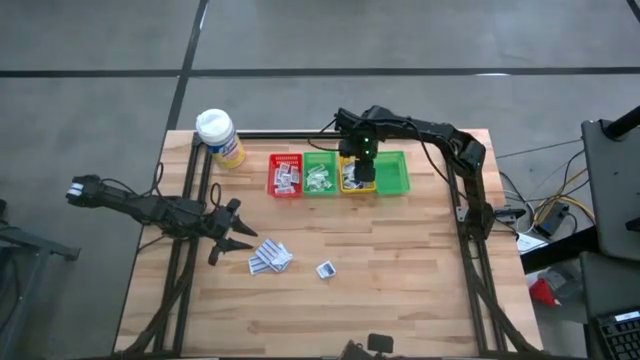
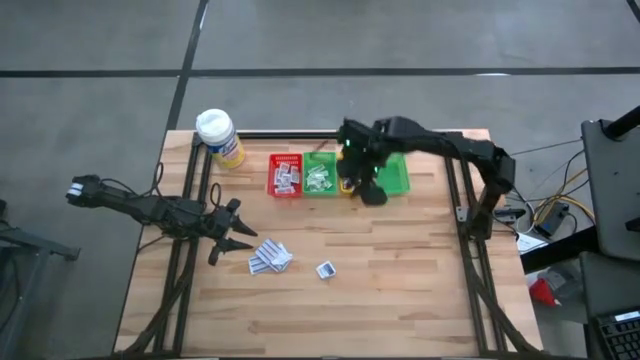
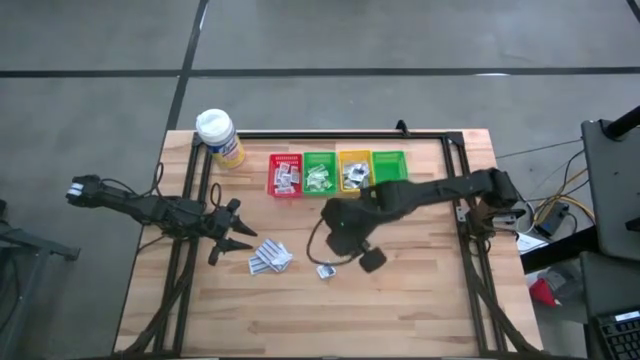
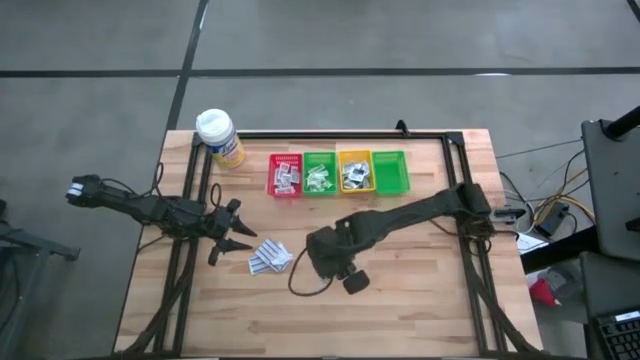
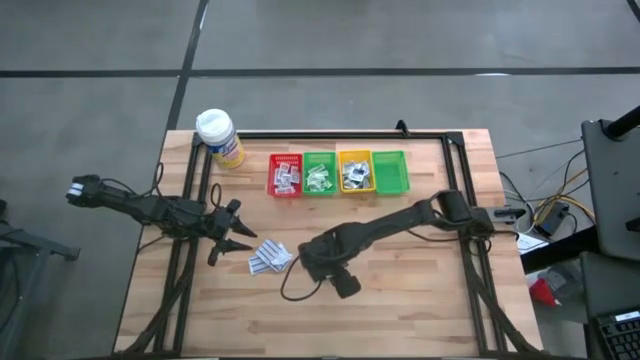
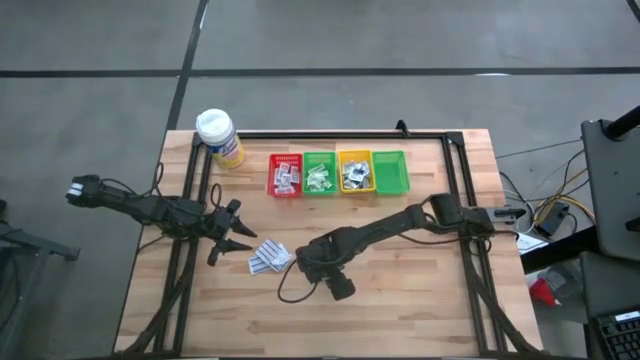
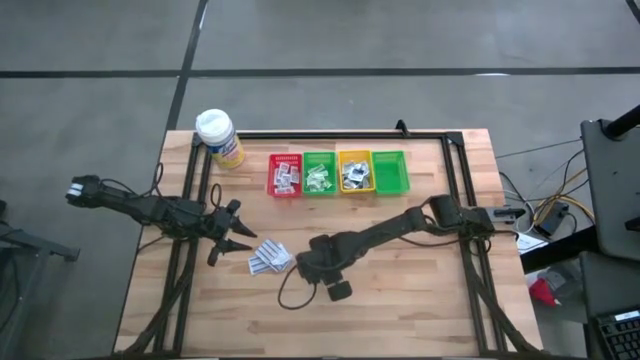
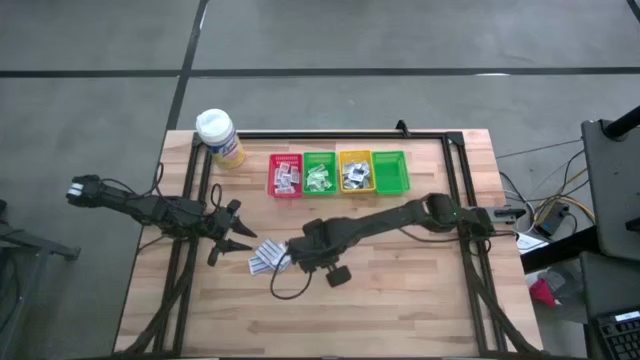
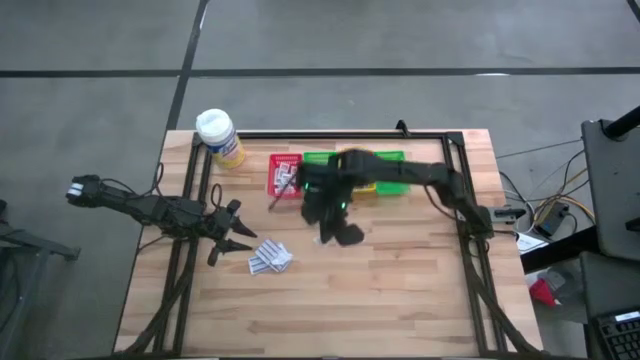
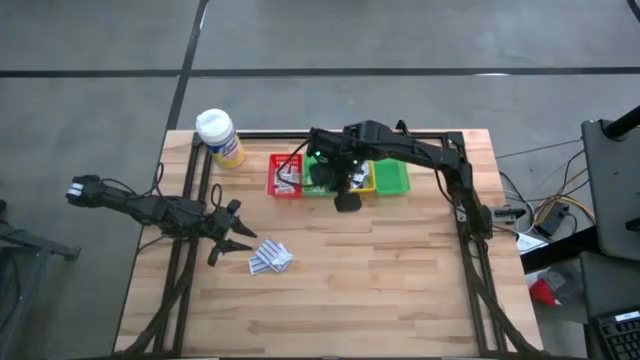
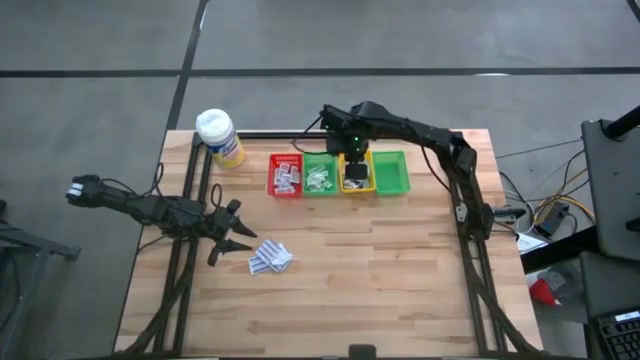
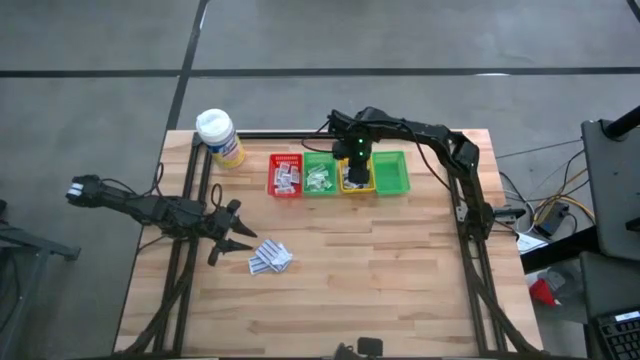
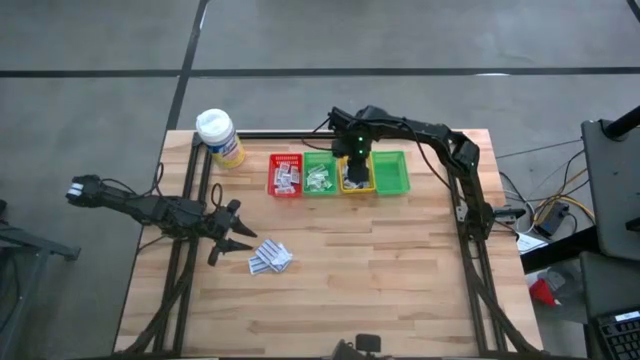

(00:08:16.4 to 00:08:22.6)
Task: Pick & Place First Aid Supplies
Put the alcohol pad into the yellow bin

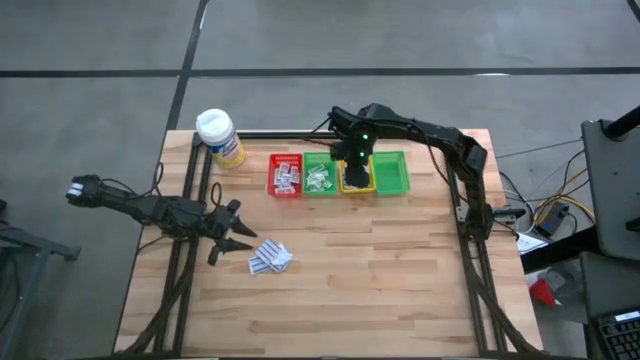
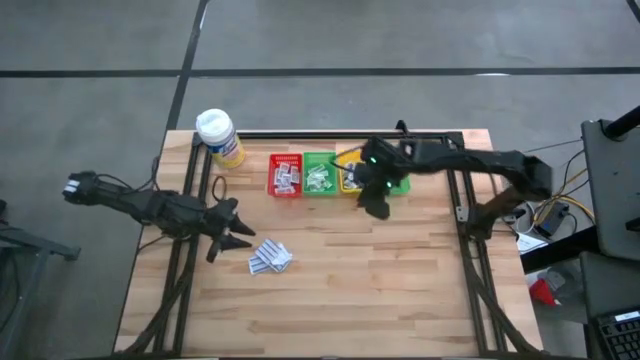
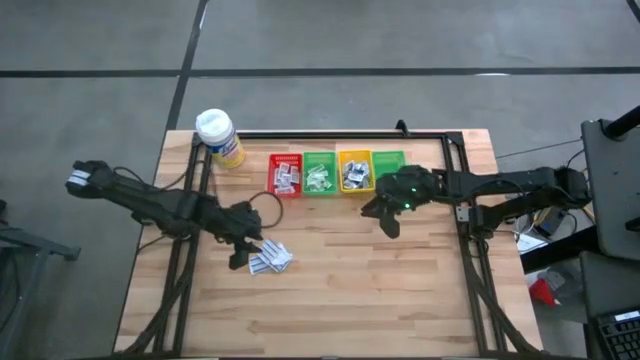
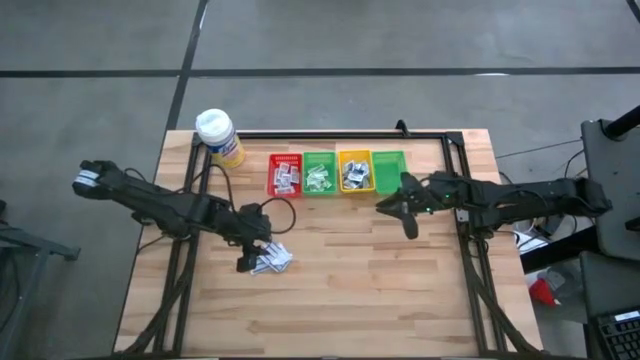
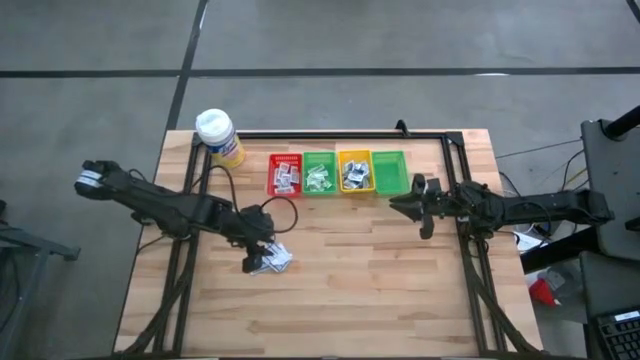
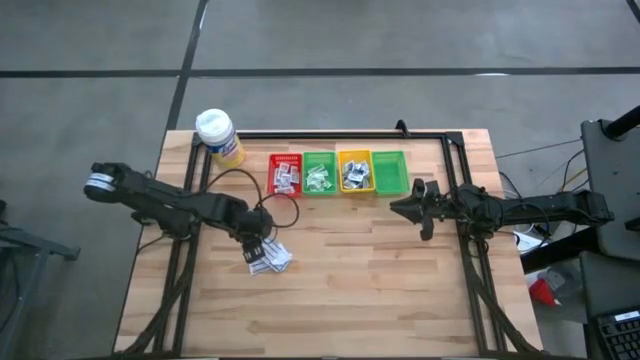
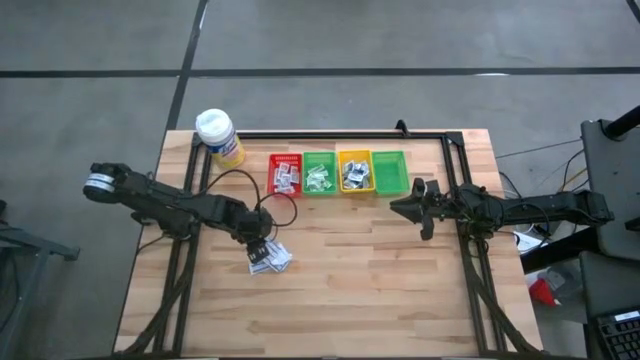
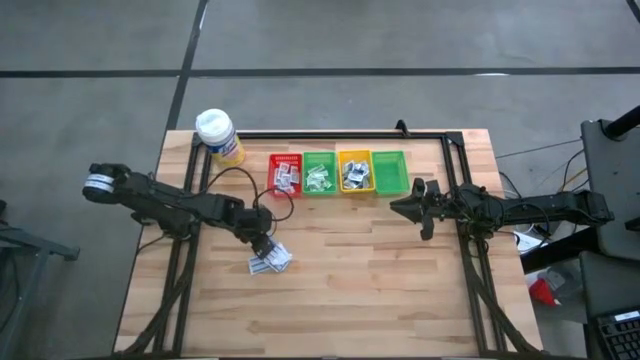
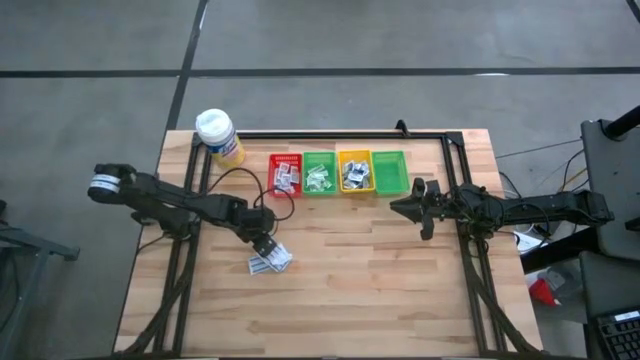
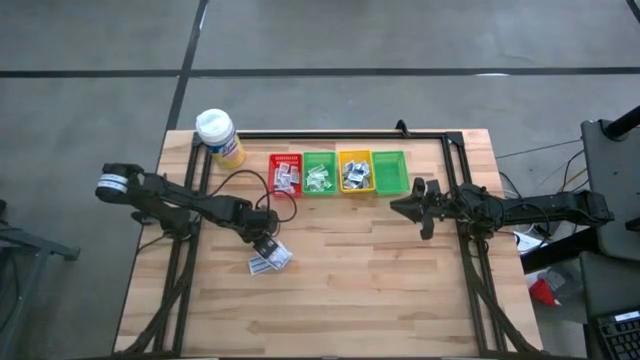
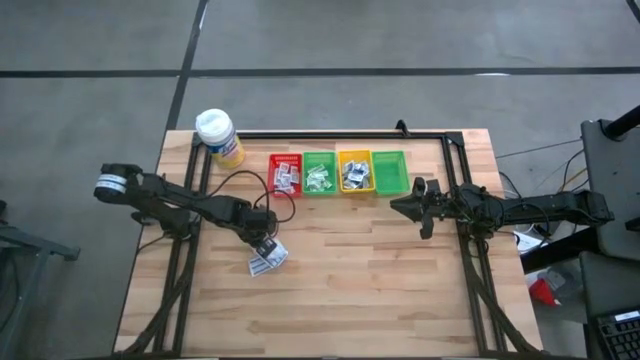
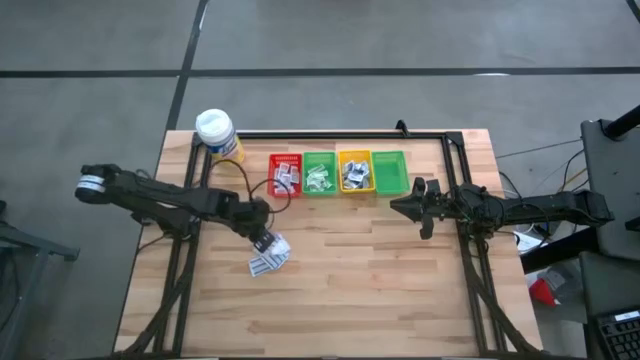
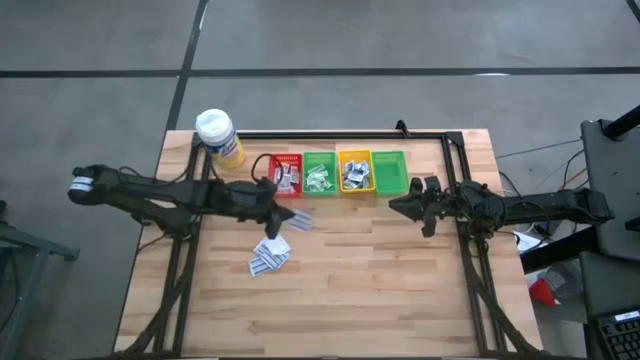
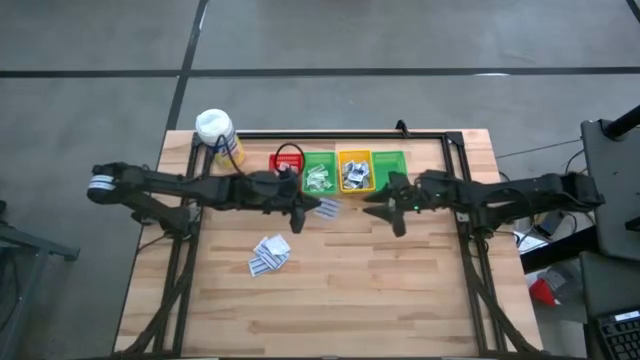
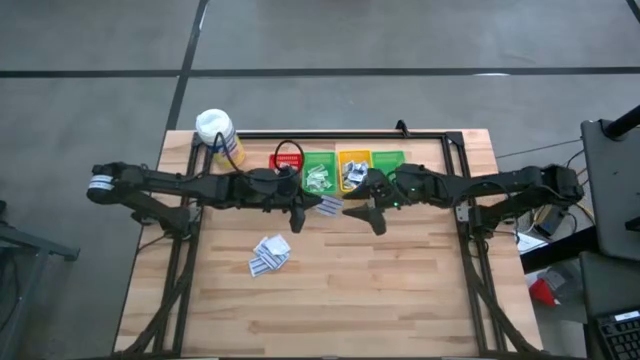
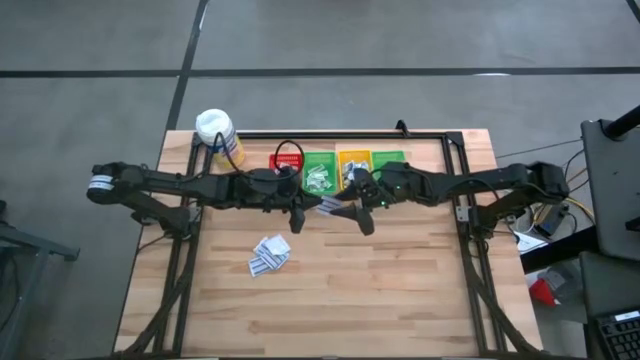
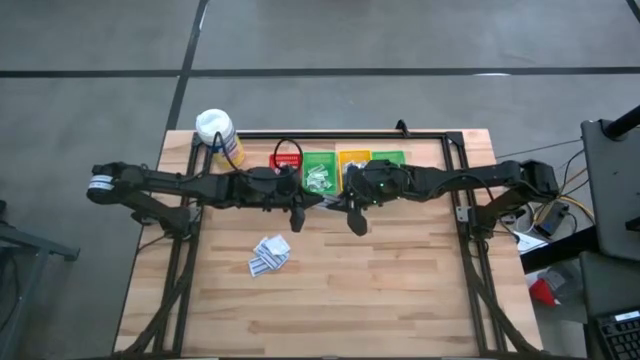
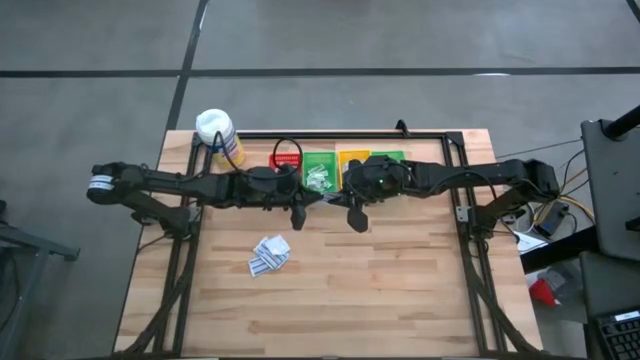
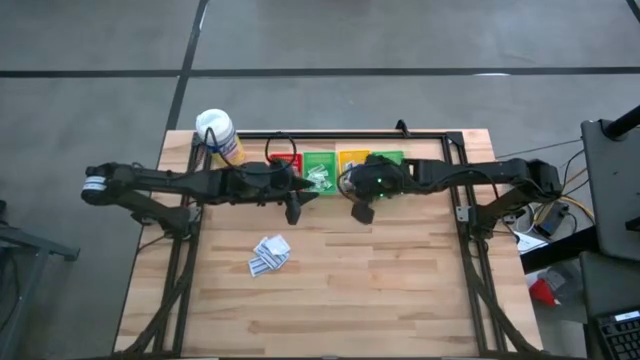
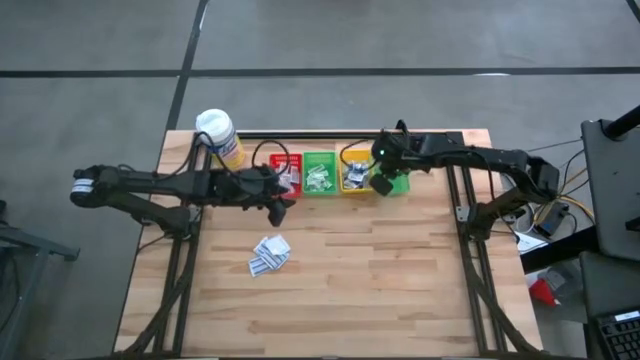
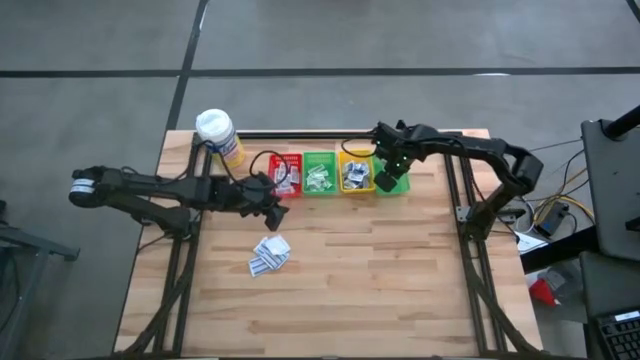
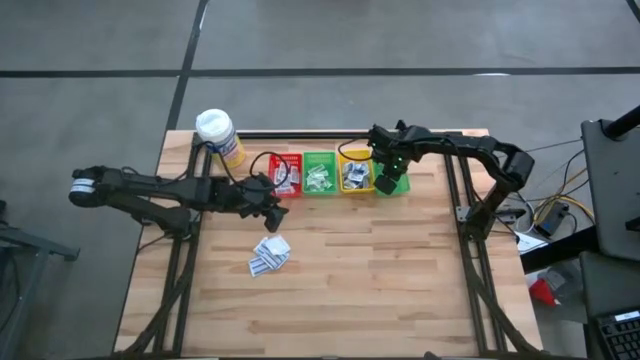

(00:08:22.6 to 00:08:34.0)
Put the blue fingertip bandage into the right green bin

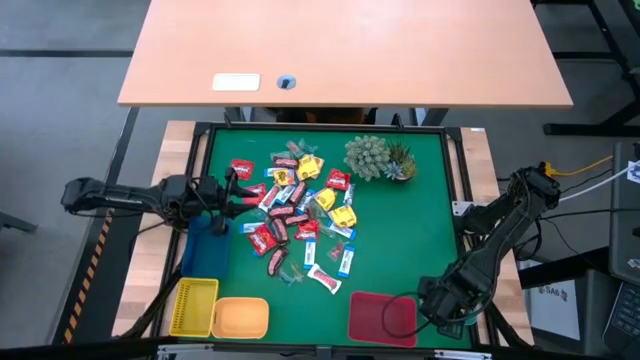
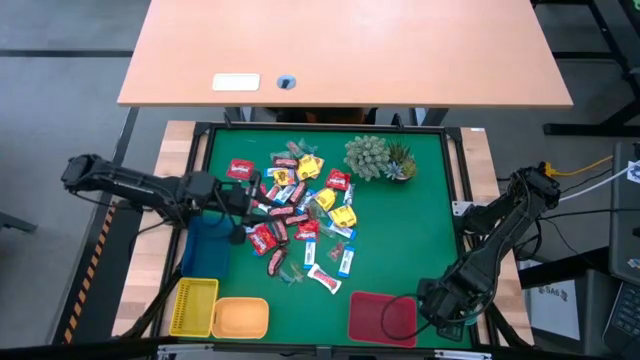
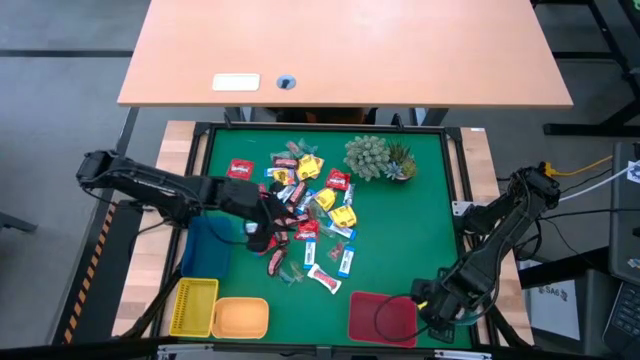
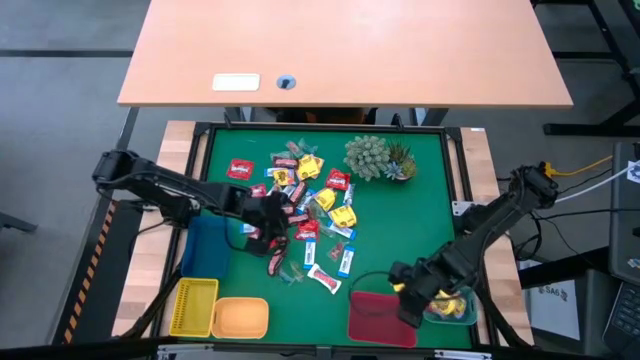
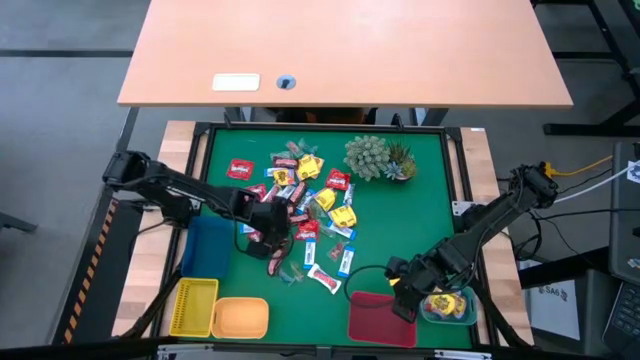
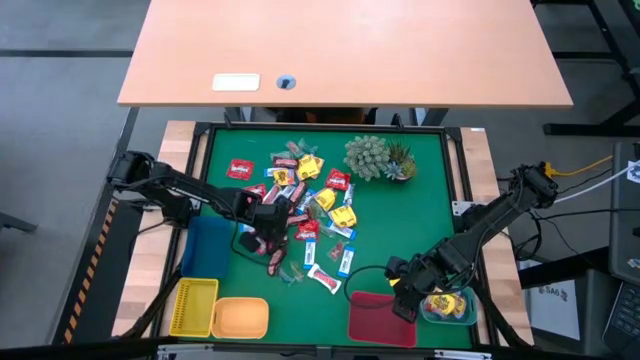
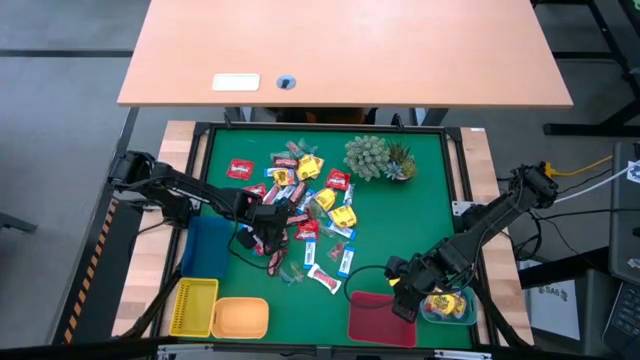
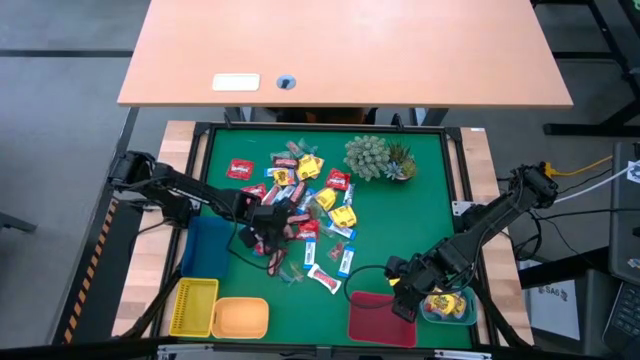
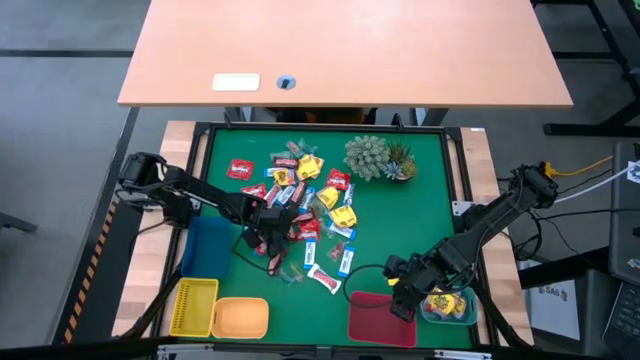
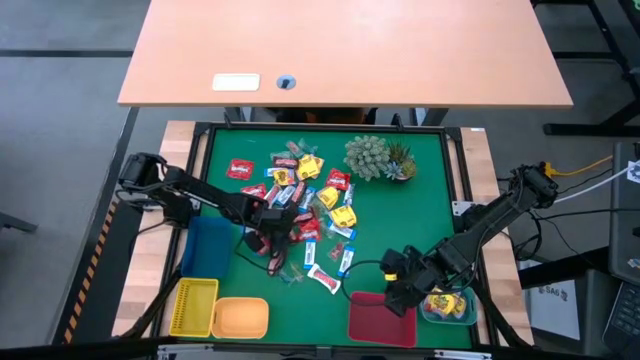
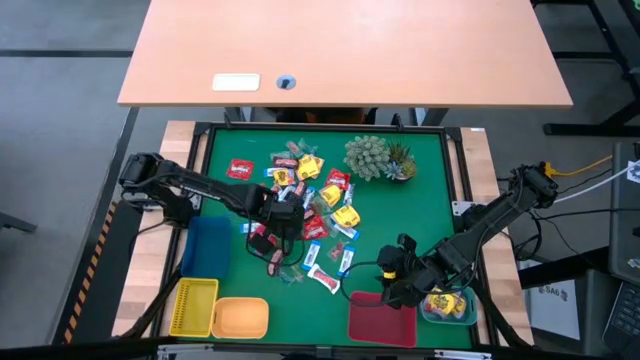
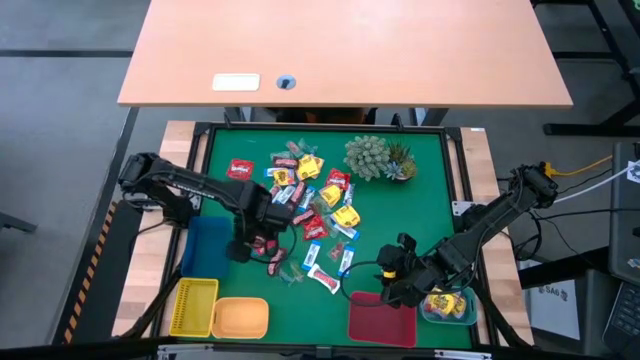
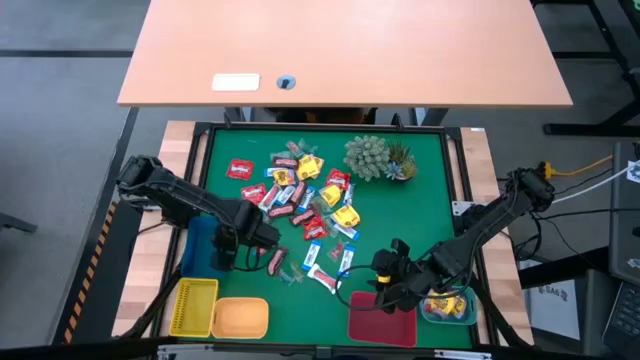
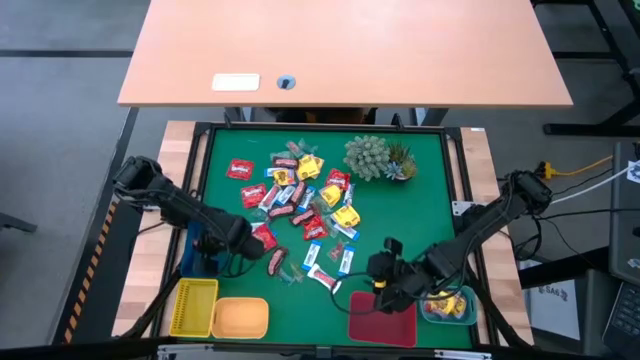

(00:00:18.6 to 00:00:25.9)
Task: Sort candy
Put the brown chocolate into the blue bin
